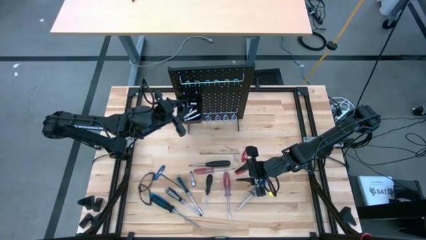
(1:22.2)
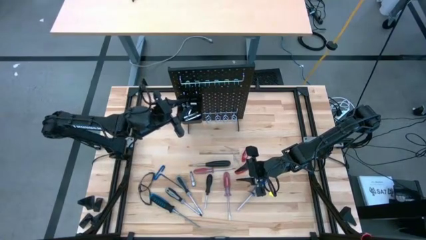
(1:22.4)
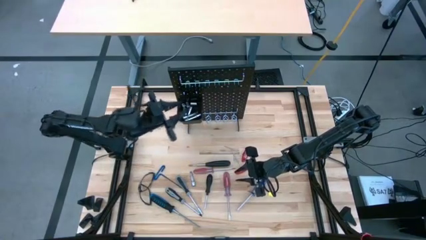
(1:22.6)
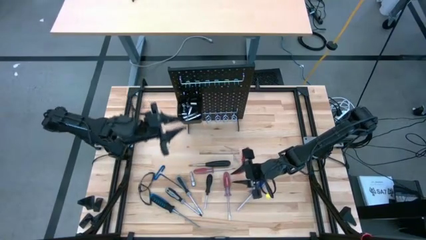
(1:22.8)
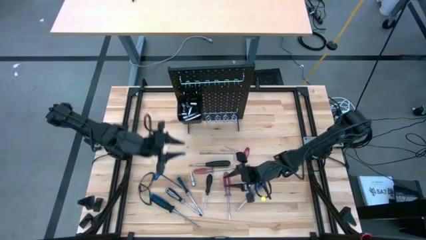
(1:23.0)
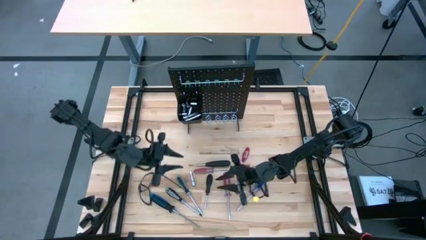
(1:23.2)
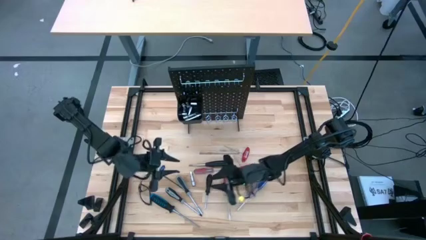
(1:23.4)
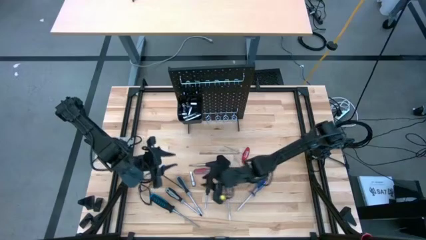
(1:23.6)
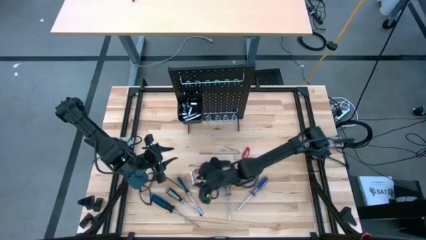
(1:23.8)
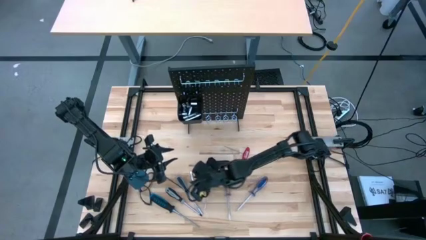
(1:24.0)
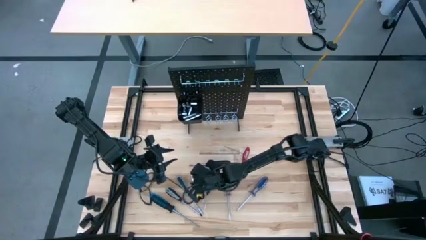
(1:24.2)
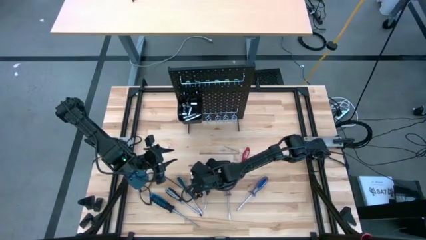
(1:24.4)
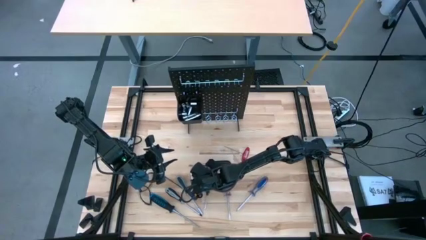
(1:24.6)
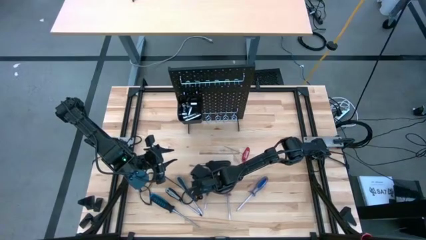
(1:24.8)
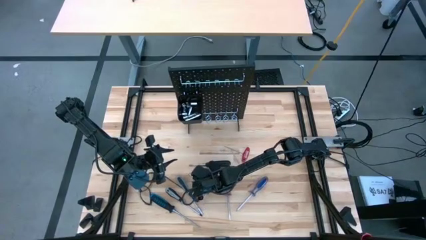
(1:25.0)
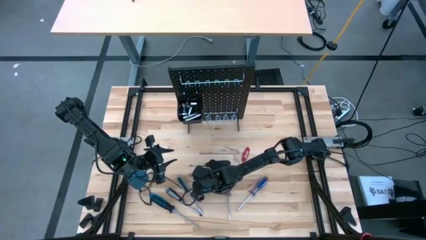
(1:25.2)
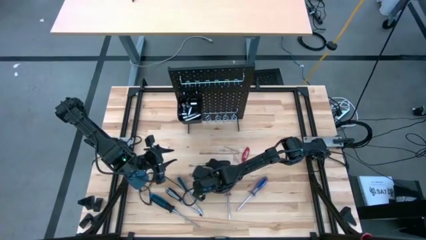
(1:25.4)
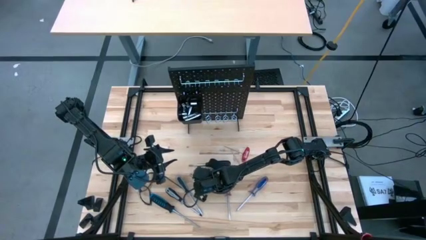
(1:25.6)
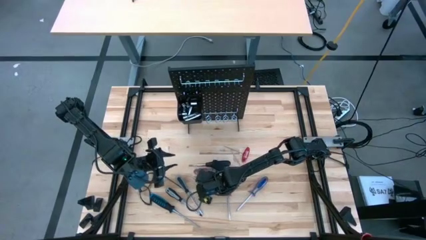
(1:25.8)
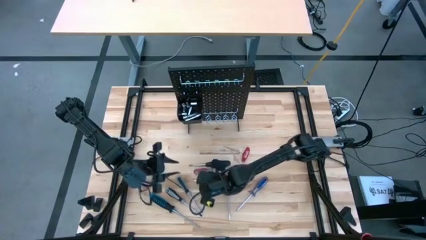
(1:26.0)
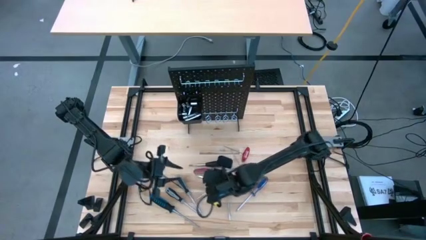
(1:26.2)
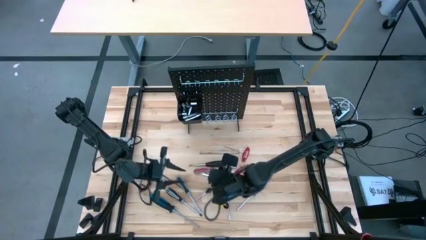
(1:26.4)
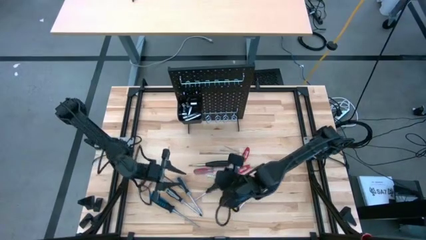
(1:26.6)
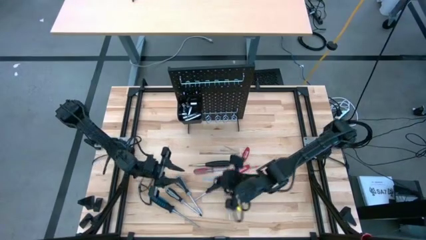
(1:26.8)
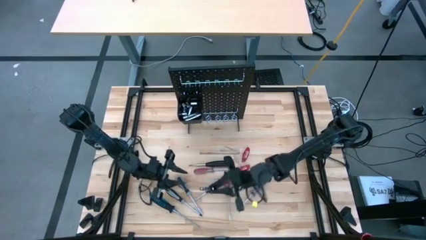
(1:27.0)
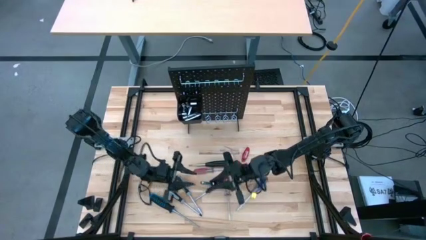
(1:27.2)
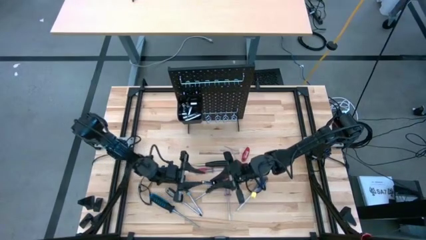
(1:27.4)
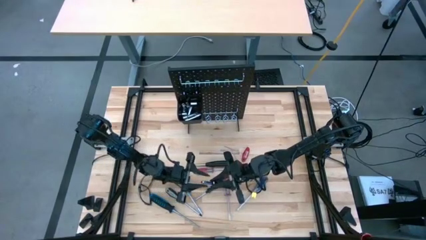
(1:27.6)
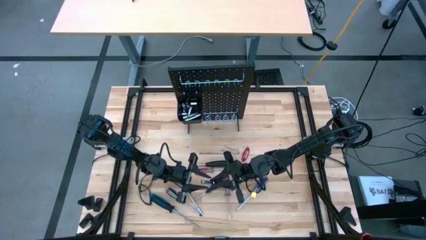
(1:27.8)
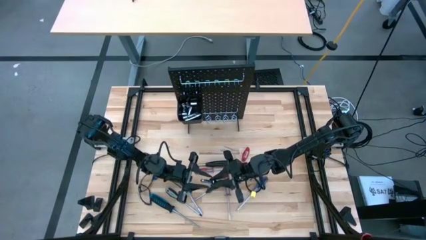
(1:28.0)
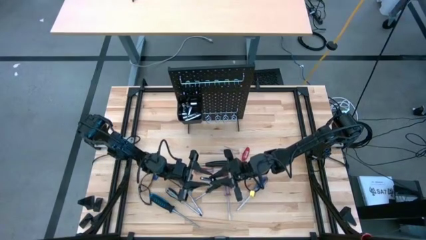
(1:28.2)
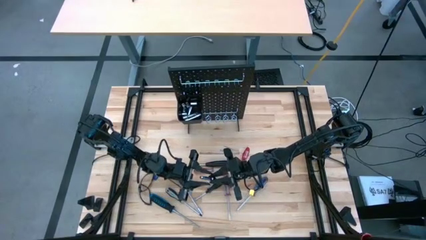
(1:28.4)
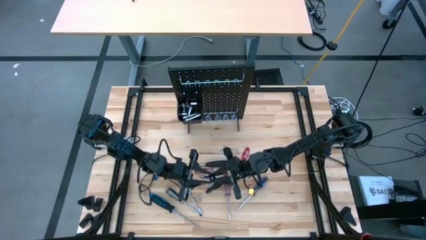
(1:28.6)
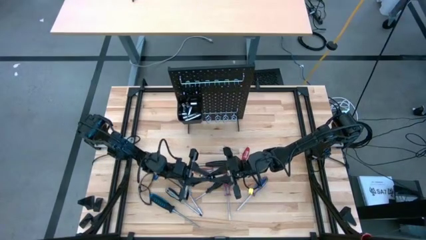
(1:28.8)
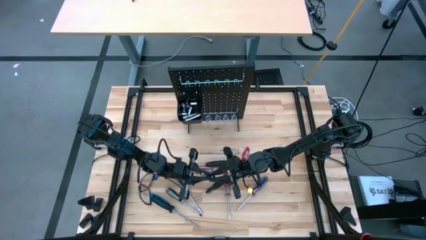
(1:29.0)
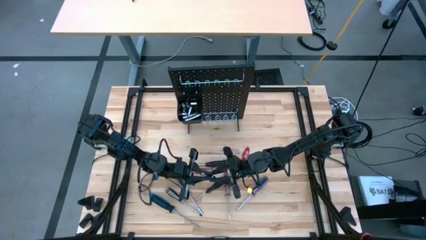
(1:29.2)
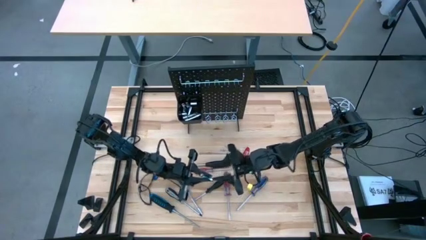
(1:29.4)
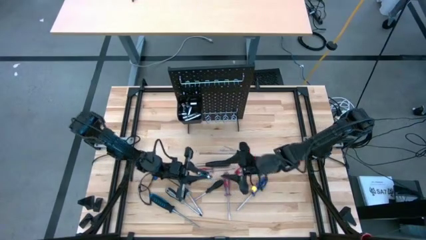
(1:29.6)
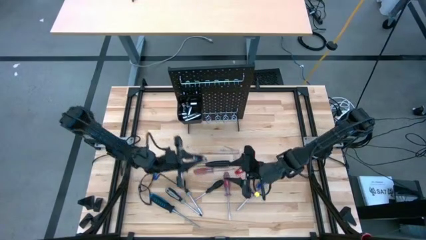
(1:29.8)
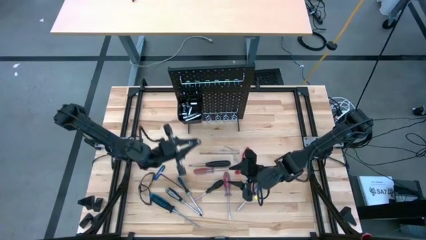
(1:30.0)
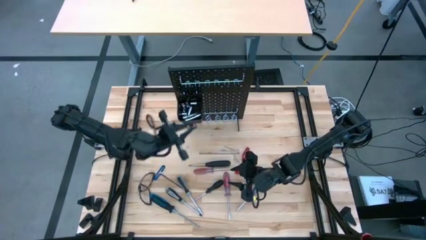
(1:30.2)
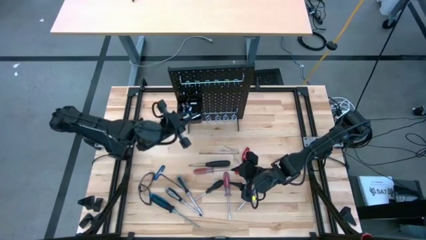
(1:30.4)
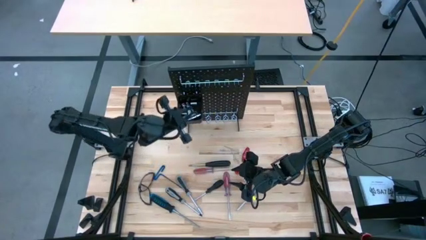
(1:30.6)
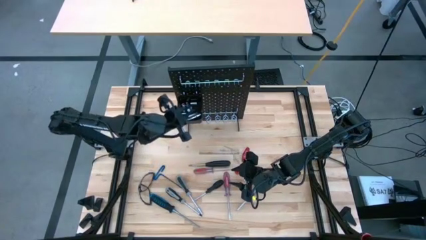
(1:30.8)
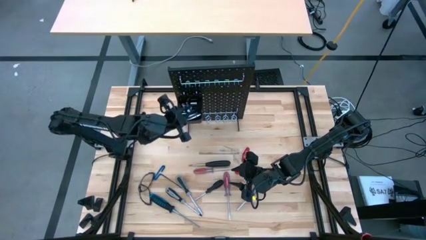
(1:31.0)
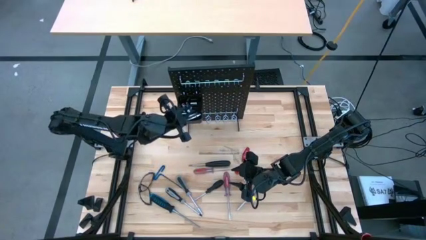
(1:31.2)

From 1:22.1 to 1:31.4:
Task: Hang tools onto peg board
Put the extension bar into the black bin on the pegboard

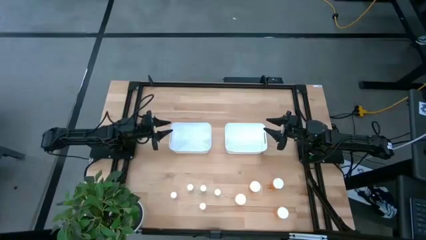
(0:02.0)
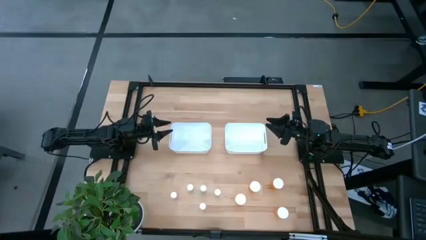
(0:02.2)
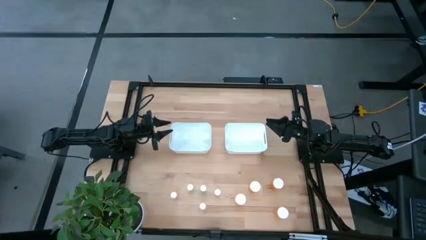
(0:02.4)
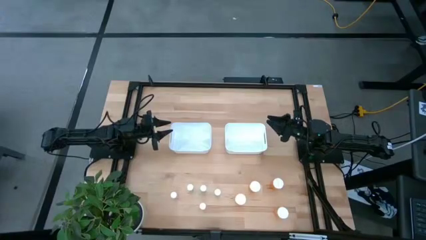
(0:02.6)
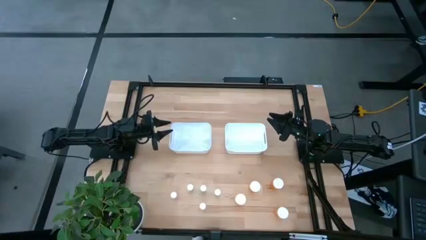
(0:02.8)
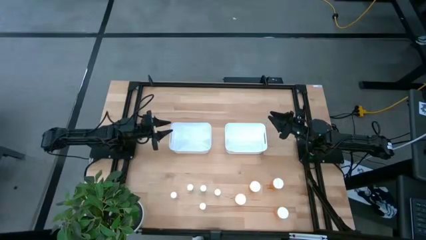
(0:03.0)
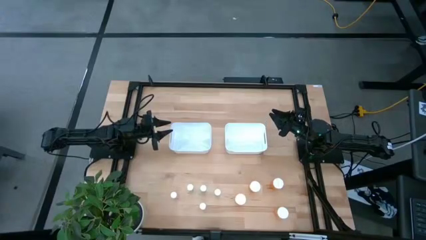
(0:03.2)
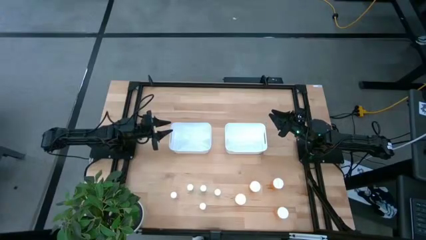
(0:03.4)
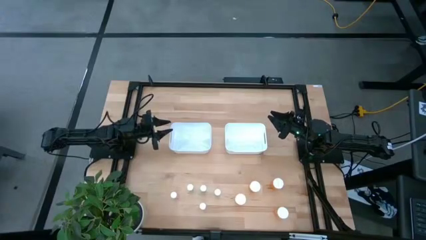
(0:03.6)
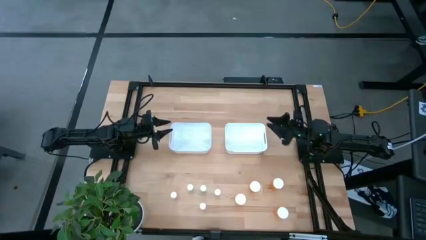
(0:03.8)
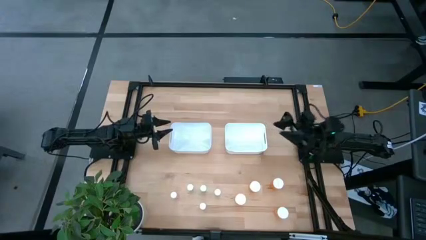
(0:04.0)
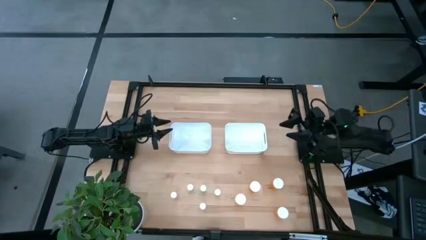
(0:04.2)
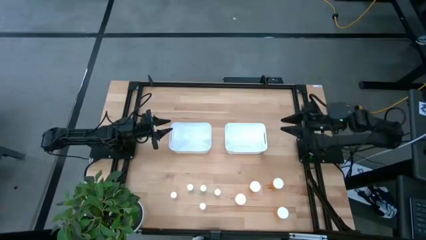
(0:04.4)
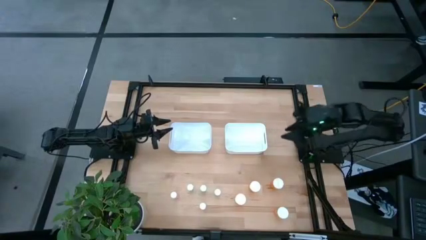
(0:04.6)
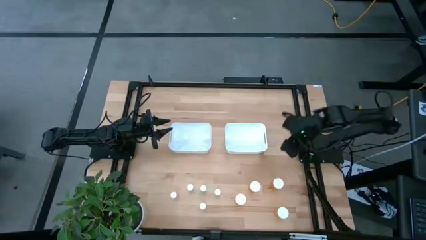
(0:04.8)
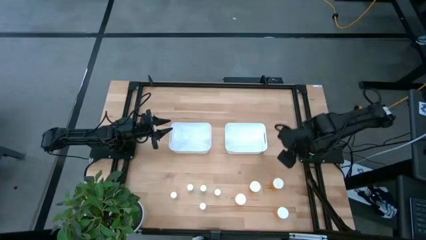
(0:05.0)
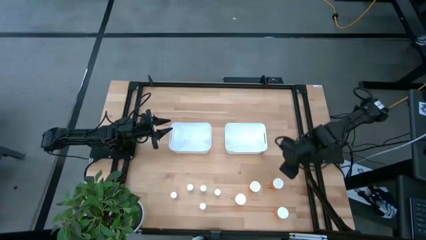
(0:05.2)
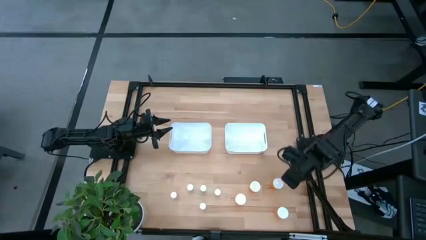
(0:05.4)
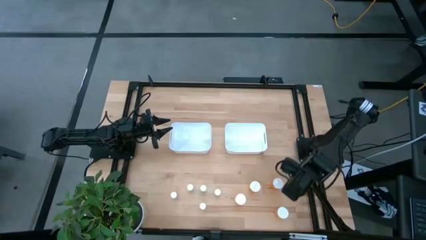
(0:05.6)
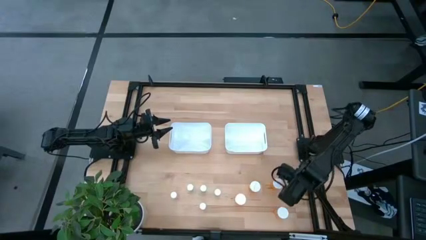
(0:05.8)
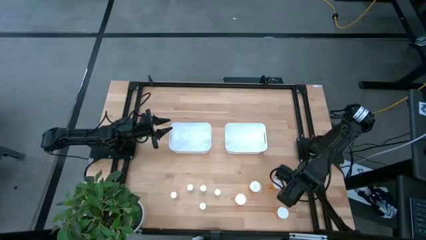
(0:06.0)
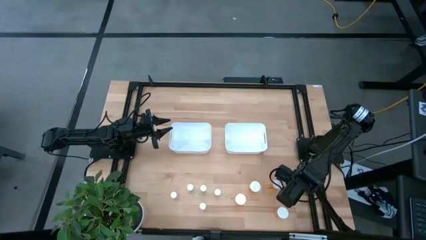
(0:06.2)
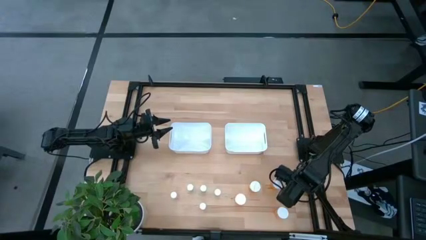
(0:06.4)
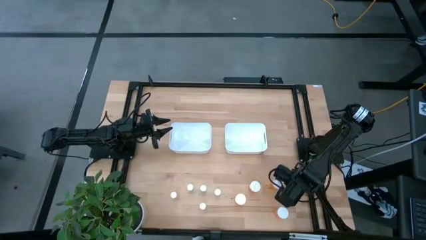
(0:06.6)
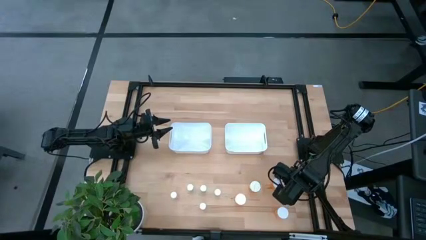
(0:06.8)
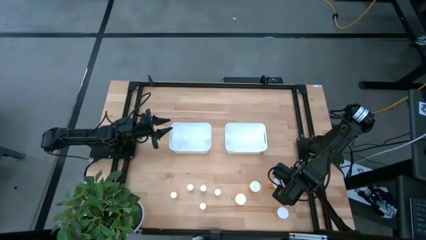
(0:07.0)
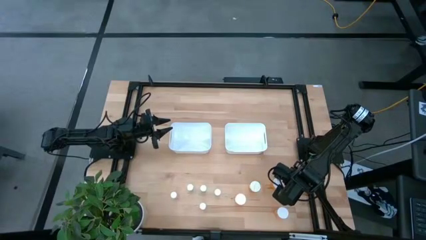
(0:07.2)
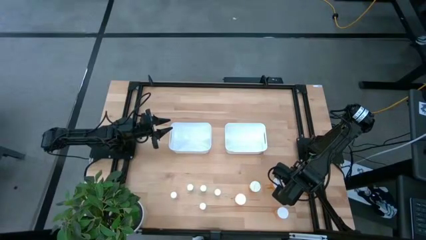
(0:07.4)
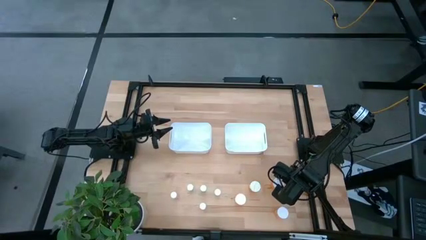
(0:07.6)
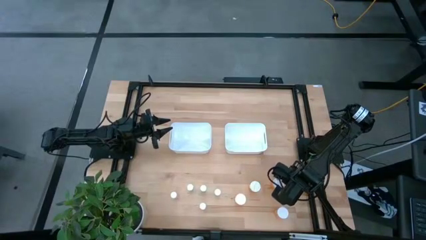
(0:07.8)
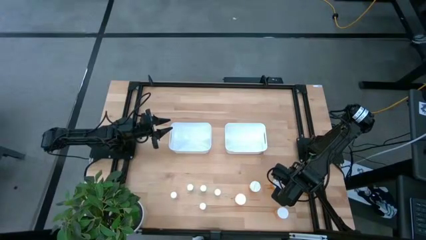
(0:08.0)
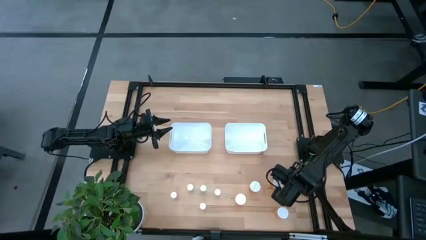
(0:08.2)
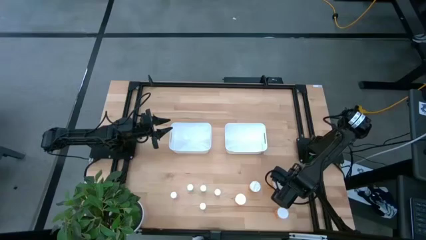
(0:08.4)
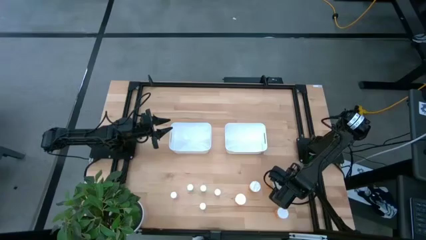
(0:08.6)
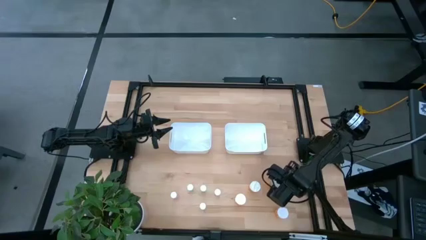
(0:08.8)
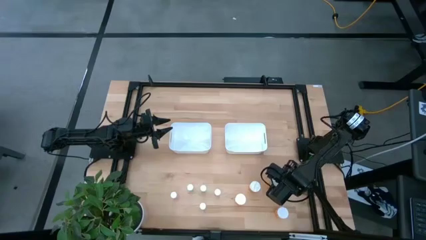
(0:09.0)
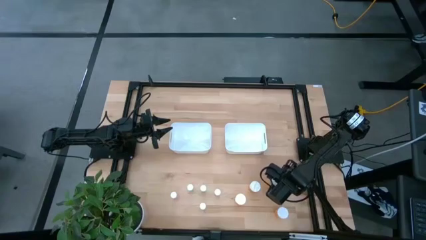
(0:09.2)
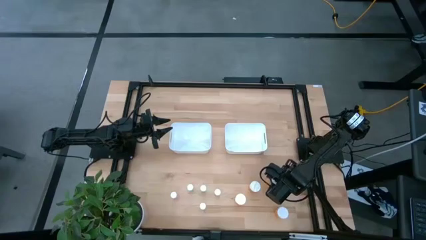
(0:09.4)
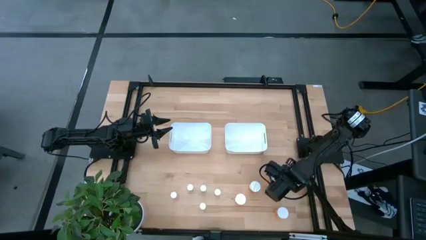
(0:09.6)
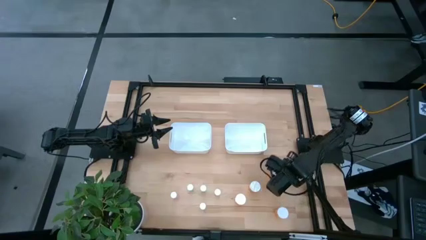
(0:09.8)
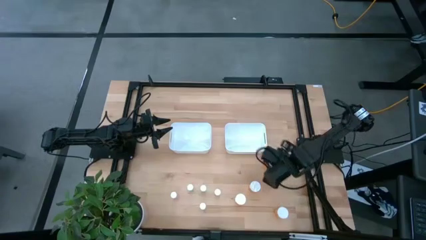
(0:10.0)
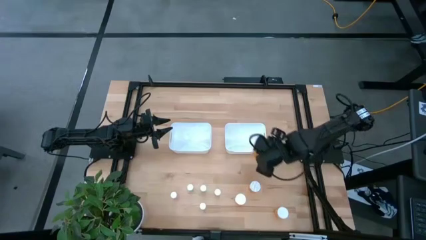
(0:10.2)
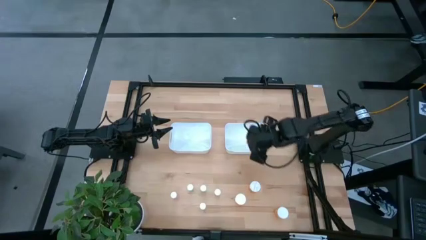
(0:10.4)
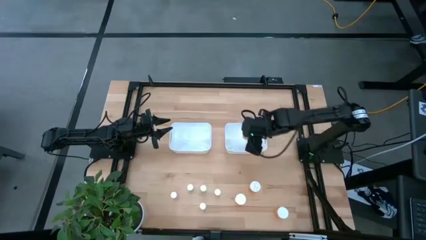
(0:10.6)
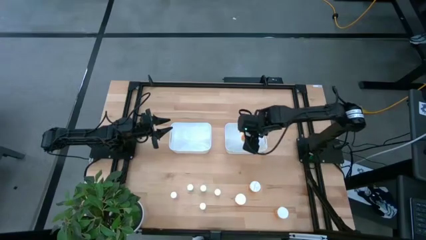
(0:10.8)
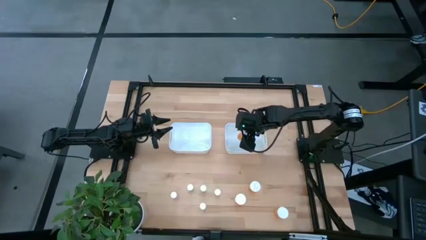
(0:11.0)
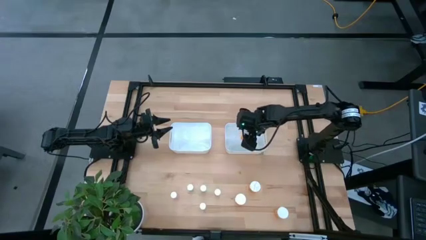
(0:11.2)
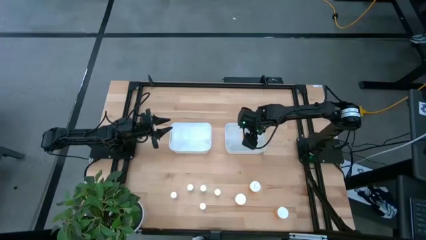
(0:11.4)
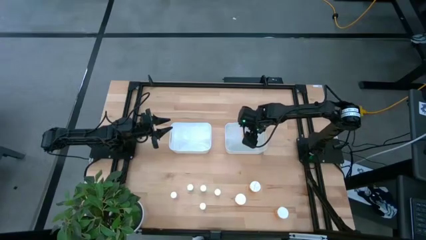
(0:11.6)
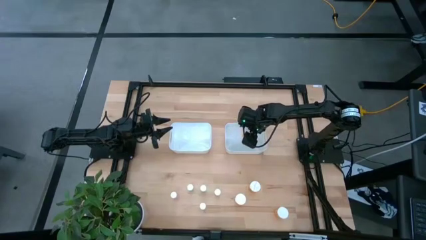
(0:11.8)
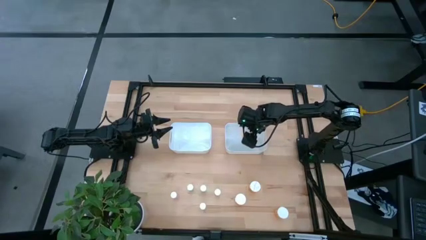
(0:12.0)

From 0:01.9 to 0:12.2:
Task: Pick and place medicine bottles into bin by pill shape (circle, oval)
Put the large orange pill bottle into the right white bin
